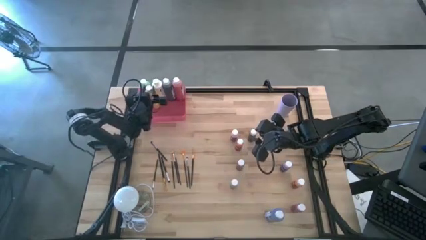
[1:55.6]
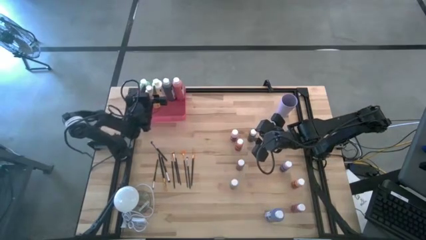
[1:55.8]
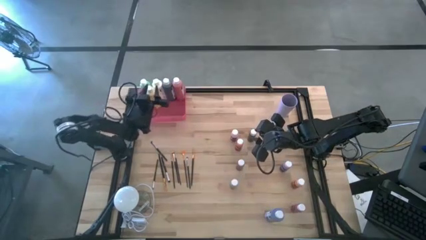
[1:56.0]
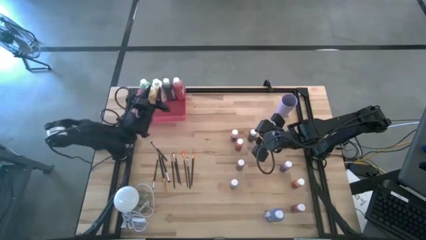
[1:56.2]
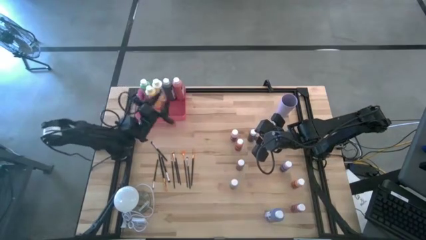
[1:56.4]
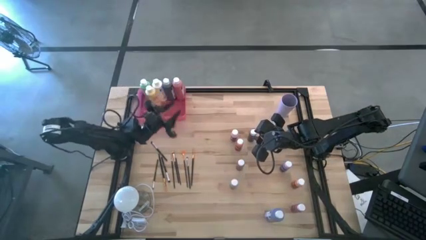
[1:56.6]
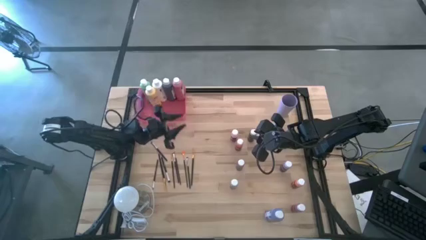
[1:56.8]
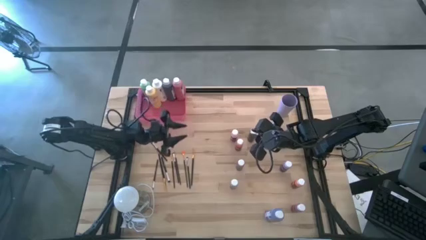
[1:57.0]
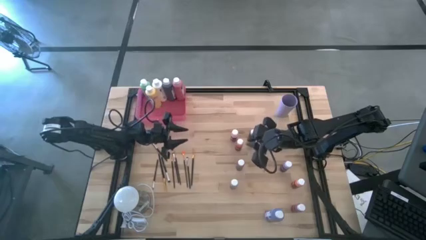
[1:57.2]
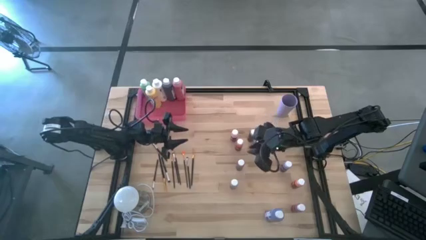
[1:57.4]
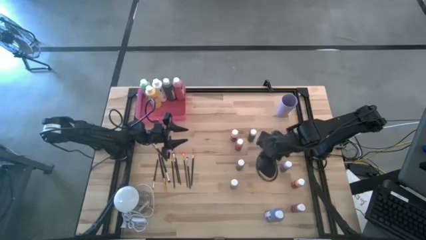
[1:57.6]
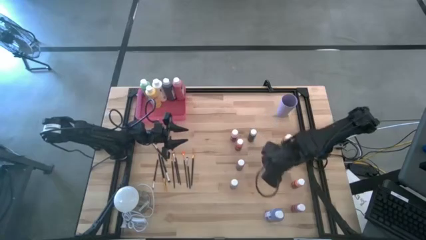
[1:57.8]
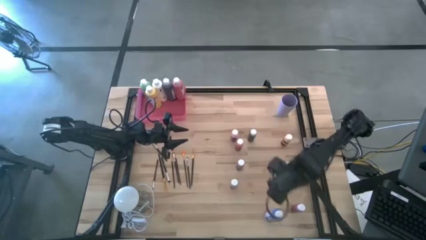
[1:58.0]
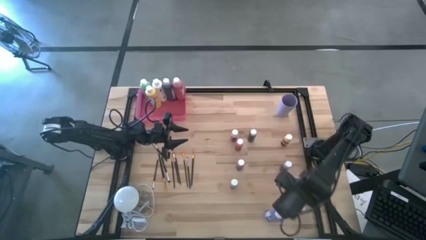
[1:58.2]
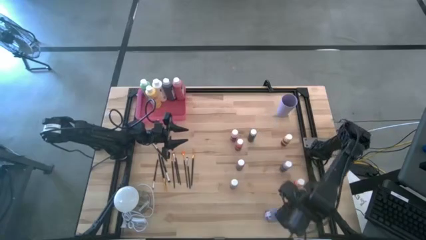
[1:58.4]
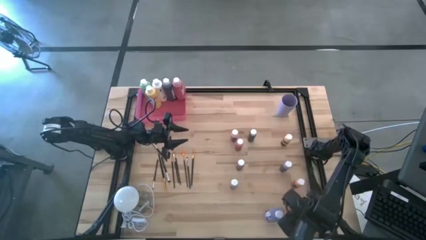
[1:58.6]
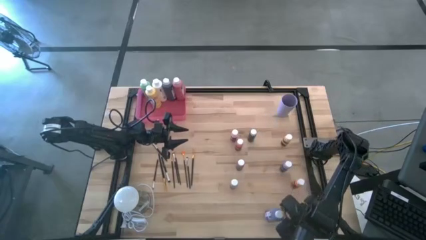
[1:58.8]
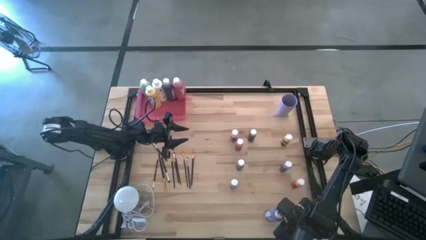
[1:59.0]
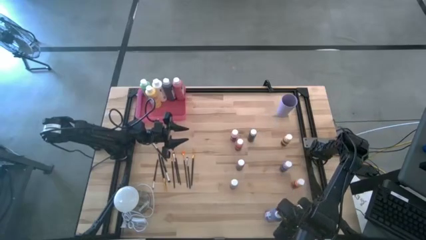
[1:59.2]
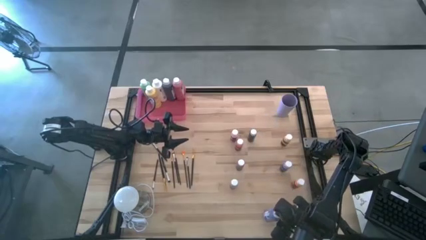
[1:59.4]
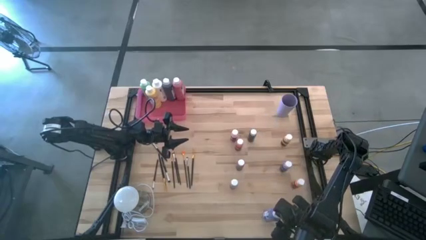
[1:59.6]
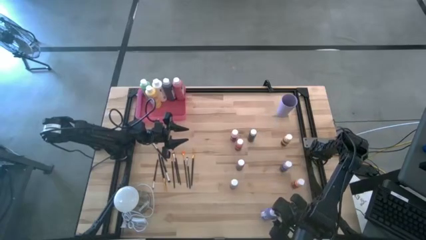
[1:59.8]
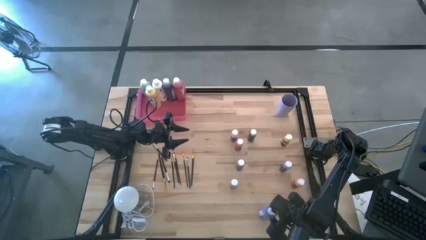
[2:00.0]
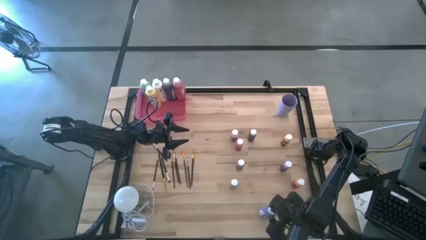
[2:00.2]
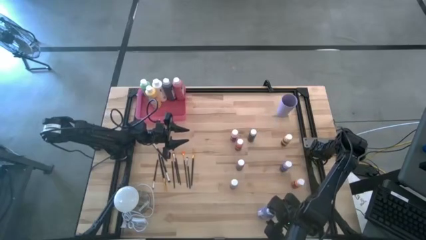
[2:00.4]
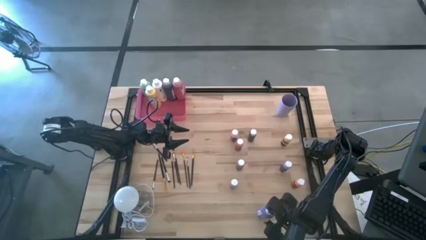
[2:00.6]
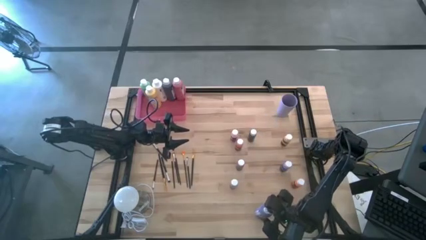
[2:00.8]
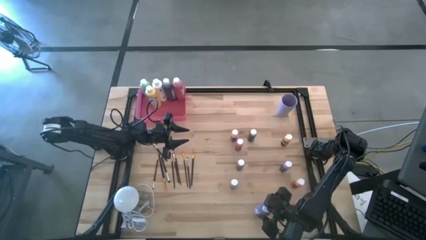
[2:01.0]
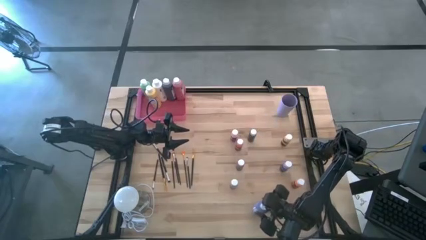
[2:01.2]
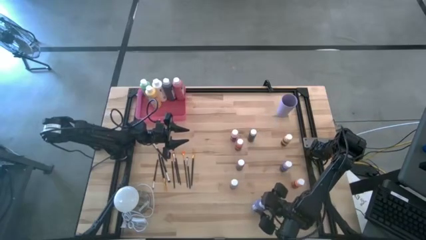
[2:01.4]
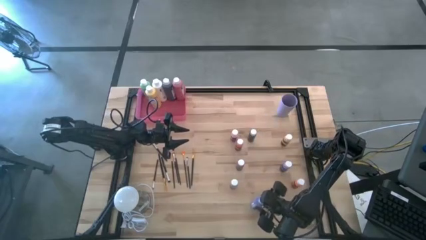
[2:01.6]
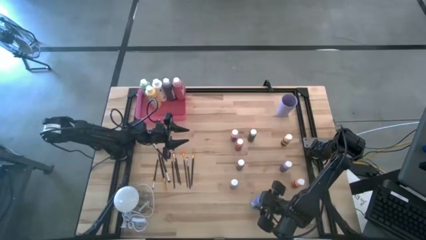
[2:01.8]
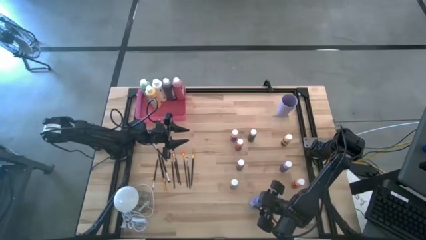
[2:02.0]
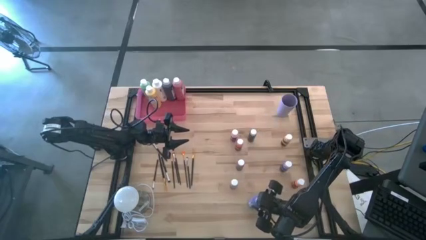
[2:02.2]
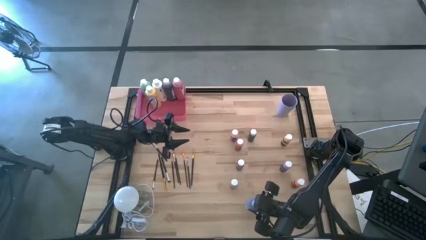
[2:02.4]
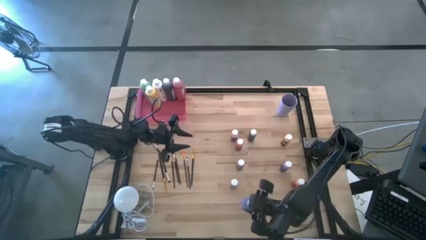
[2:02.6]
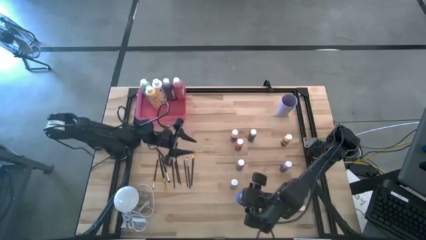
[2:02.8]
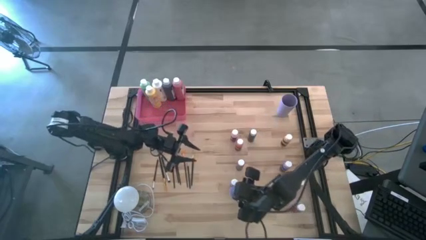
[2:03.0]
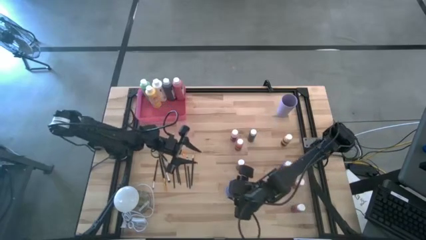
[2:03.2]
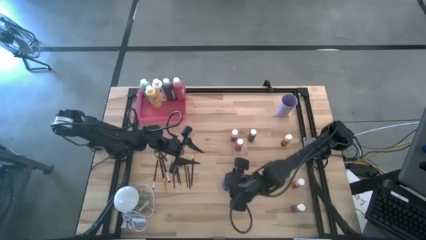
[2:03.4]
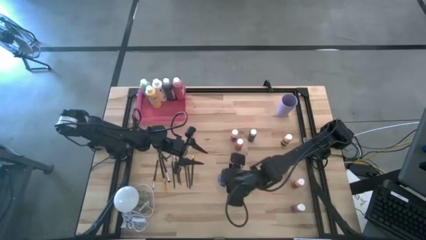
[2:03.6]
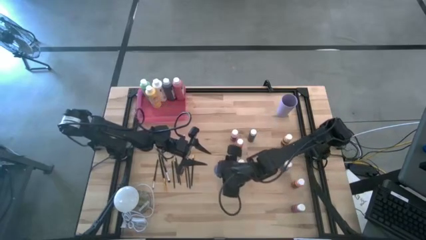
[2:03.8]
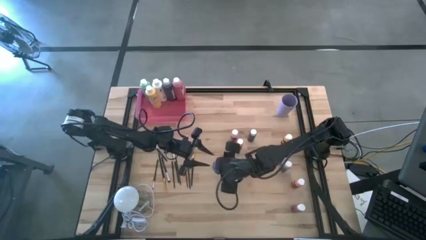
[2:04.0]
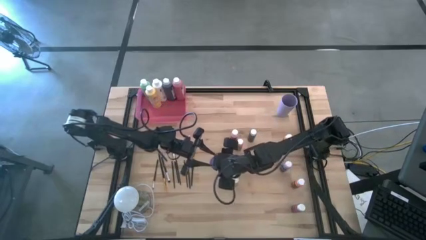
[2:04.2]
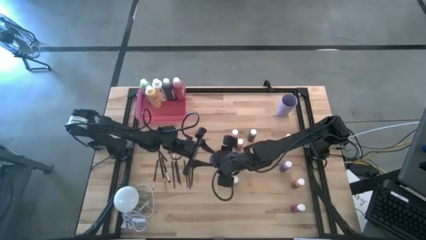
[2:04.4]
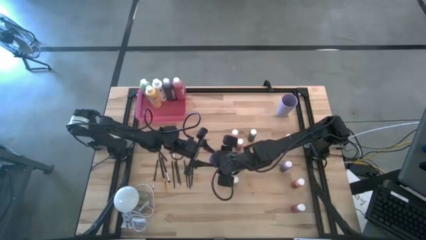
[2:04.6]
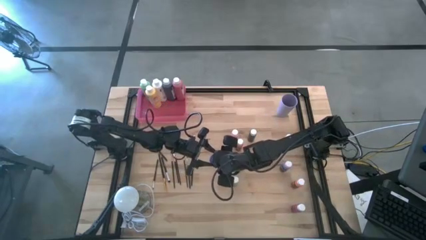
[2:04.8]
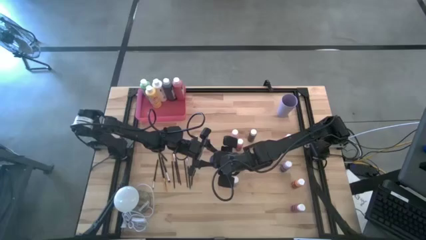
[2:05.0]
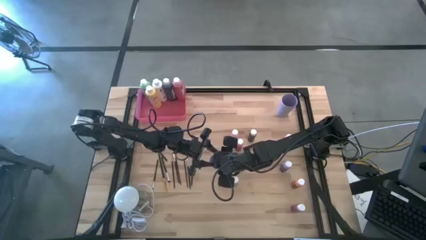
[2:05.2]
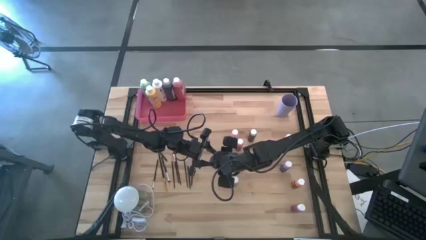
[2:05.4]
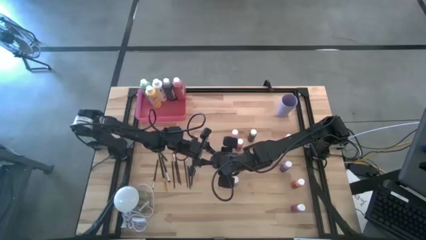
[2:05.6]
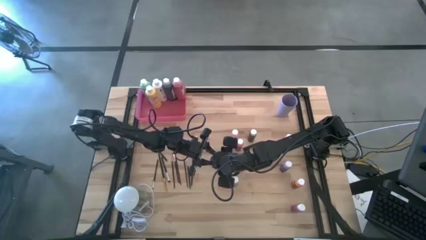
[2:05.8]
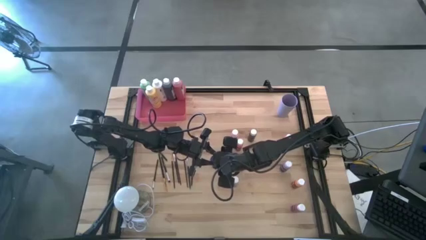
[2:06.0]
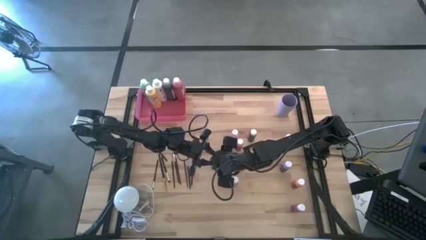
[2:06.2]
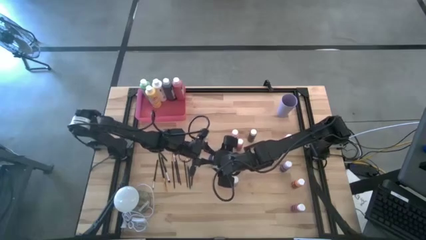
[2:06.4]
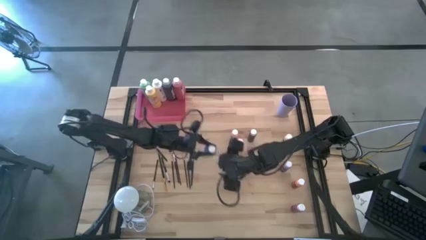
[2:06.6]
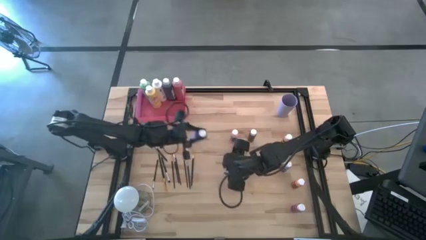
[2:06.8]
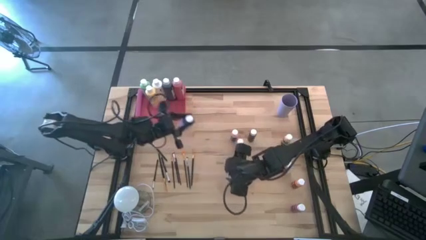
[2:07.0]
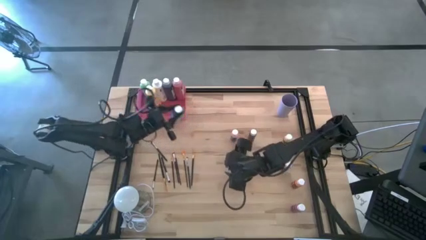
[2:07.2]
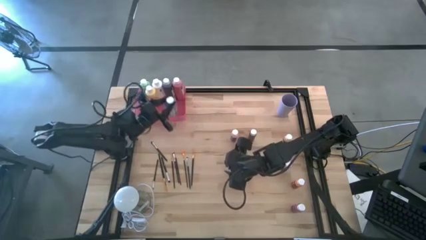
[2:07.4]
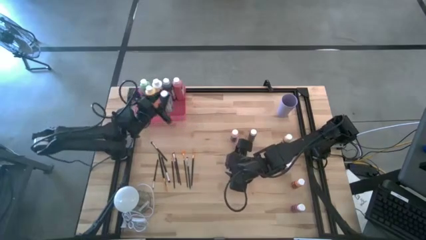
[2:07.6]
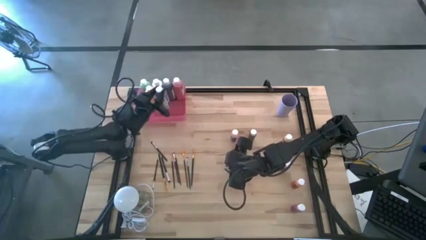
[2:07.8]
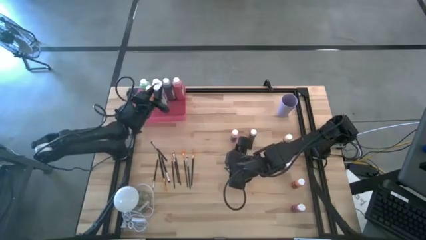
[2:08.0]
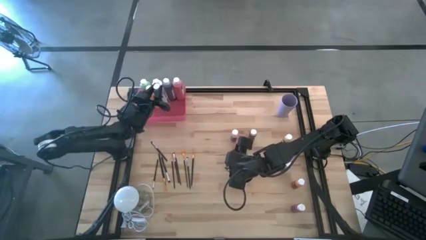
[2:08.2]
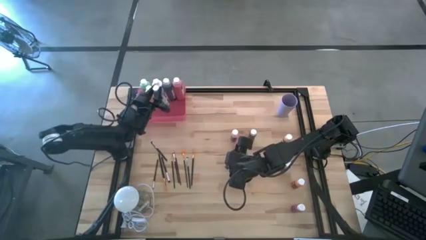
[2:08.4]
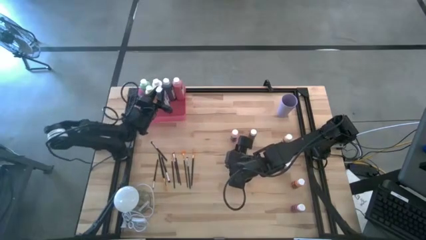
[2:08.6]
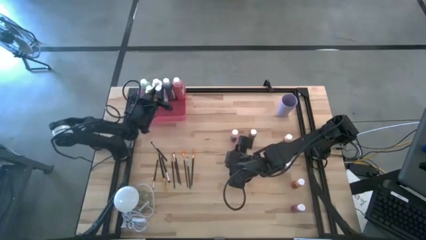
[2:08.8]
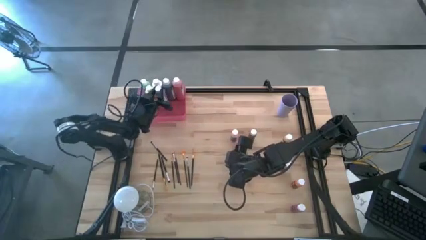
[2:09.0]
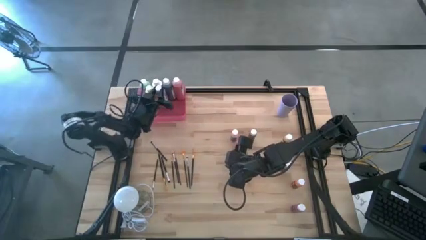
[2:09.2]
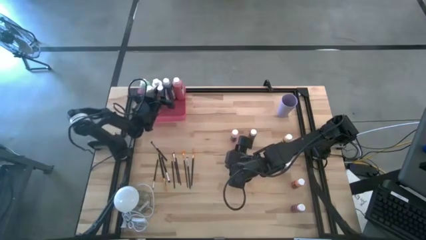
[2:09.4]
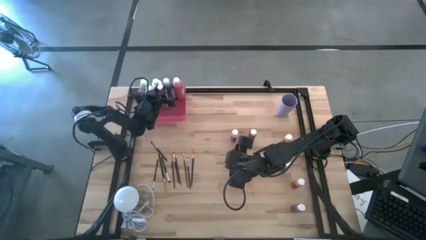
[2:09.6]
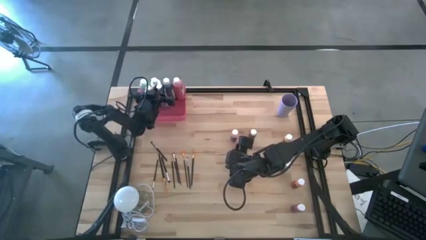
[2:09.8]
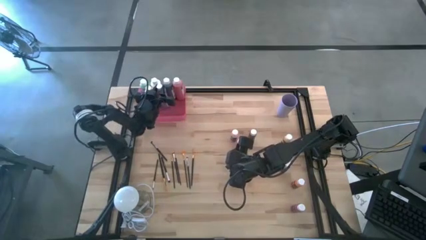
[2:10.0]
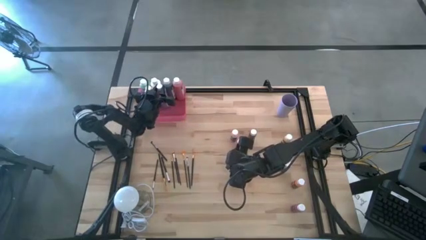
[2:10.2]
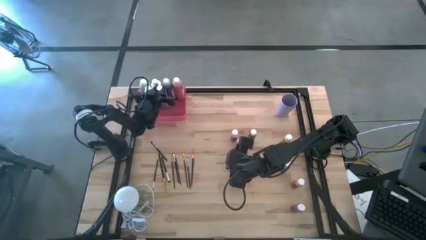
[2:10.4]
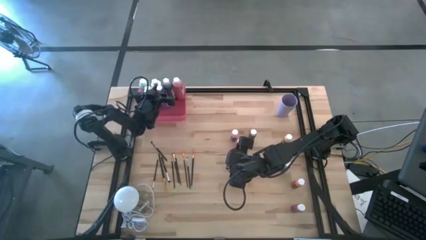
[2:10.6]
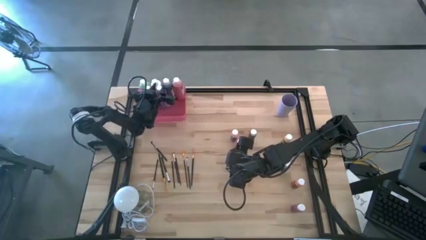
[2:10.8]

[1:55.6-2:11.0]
Task: Pick & Place Paint Supplies
Put the purple paint bottle into the pink bin
